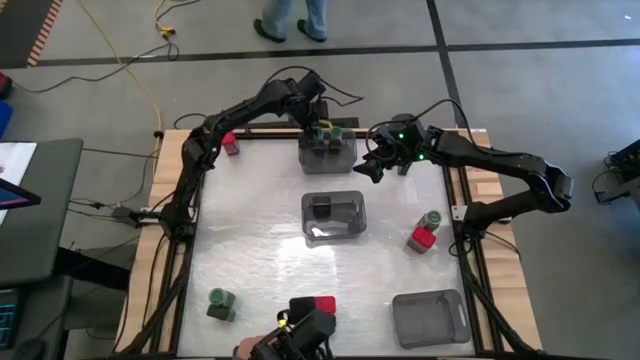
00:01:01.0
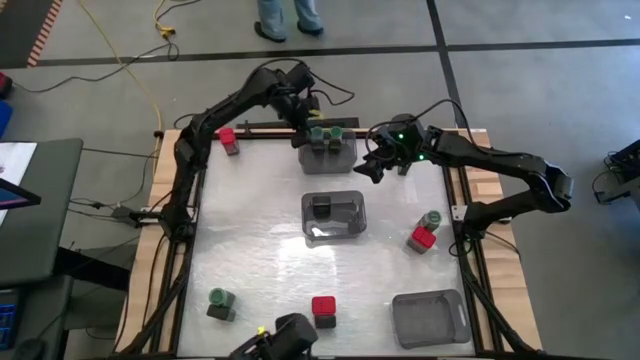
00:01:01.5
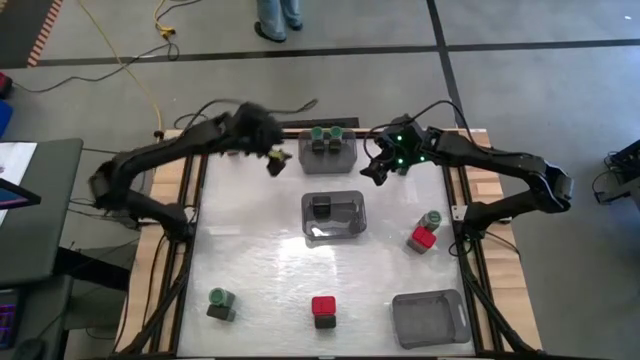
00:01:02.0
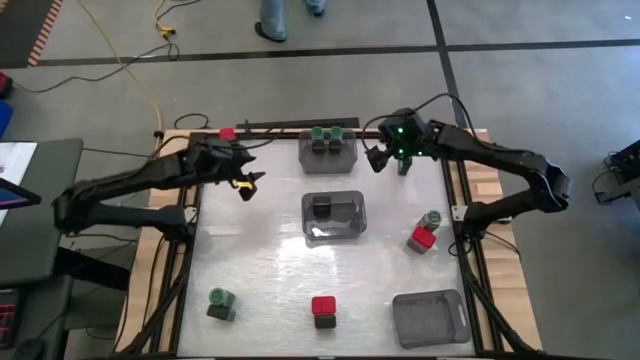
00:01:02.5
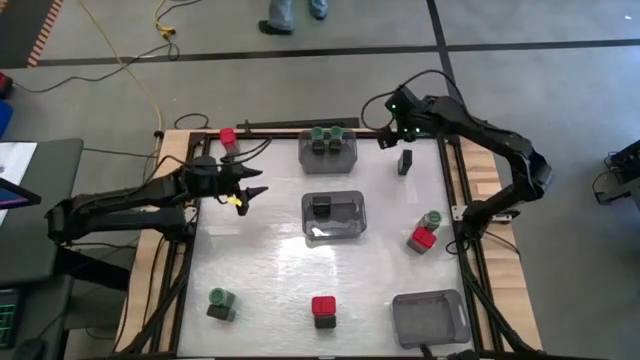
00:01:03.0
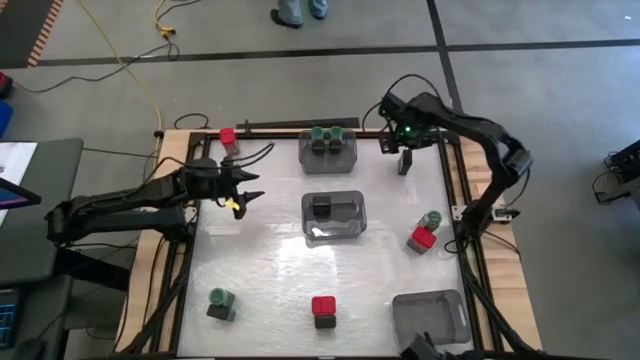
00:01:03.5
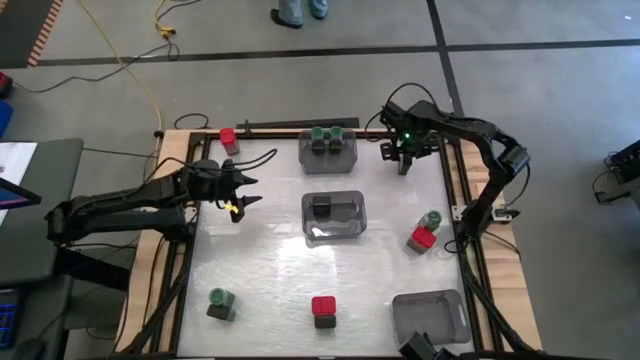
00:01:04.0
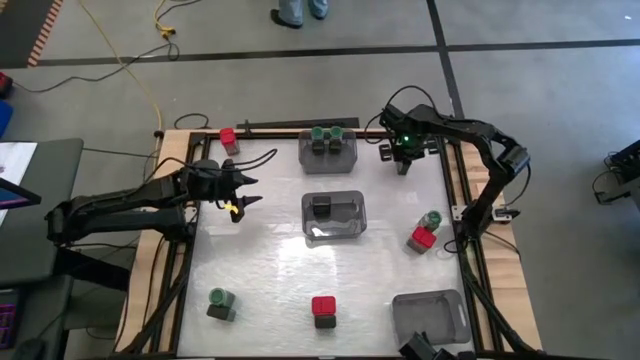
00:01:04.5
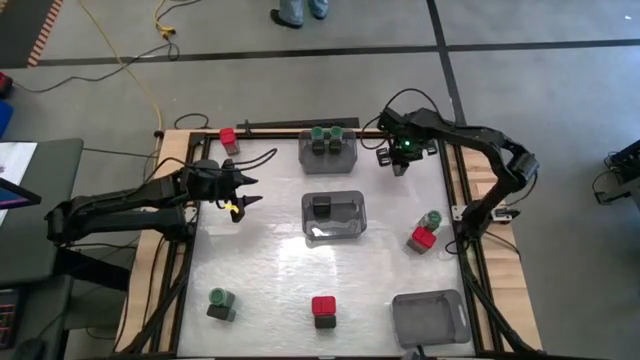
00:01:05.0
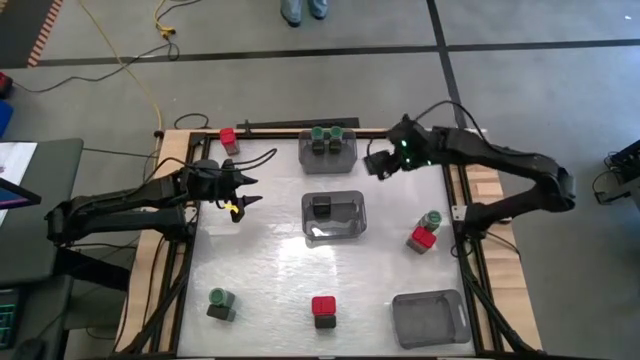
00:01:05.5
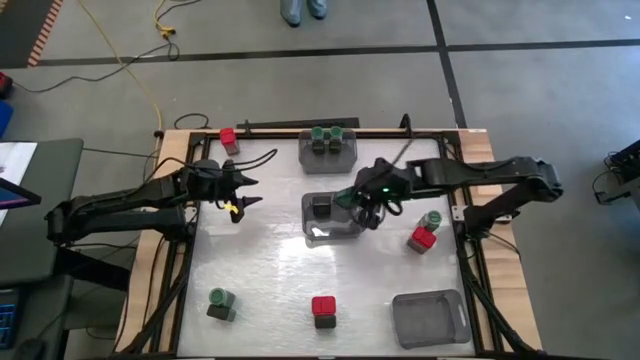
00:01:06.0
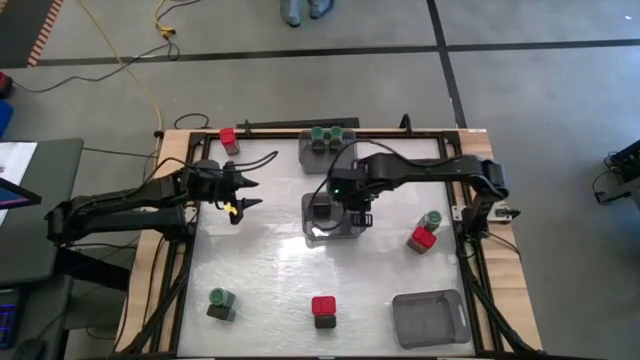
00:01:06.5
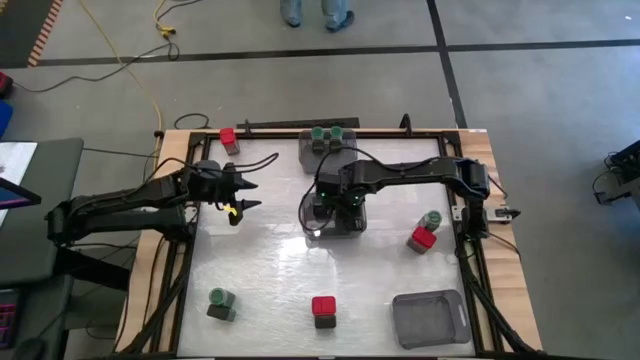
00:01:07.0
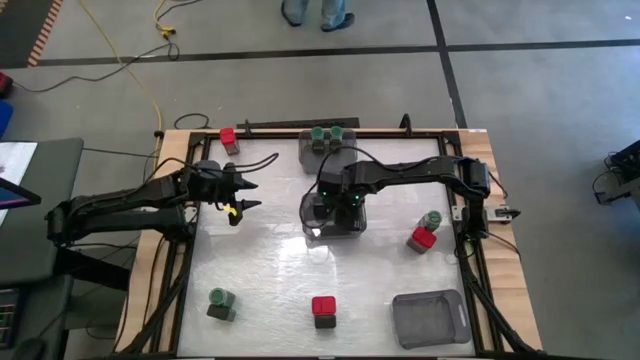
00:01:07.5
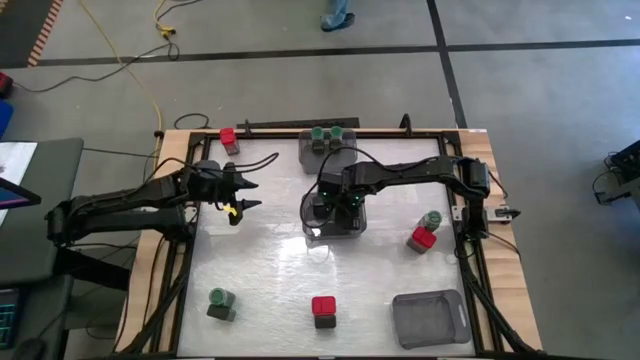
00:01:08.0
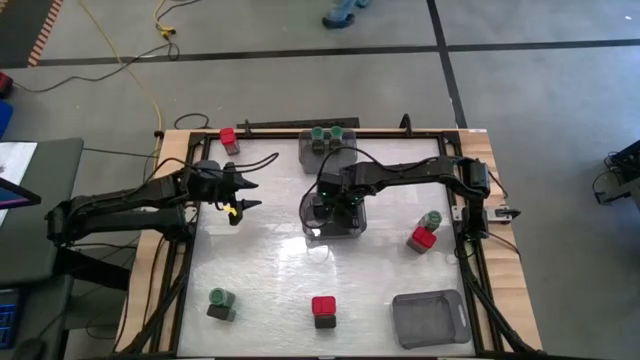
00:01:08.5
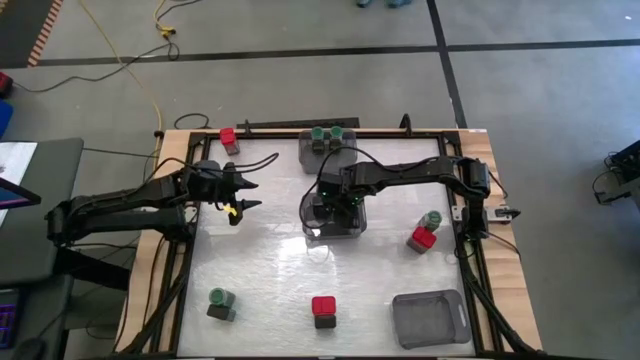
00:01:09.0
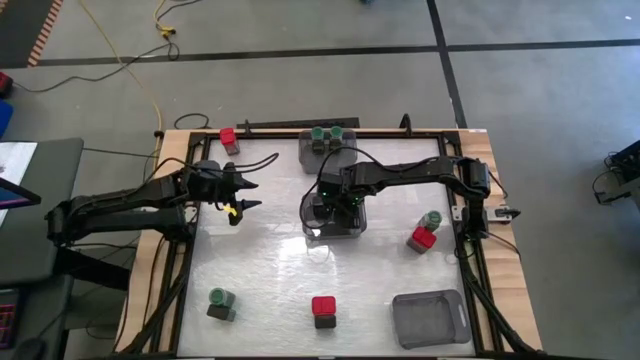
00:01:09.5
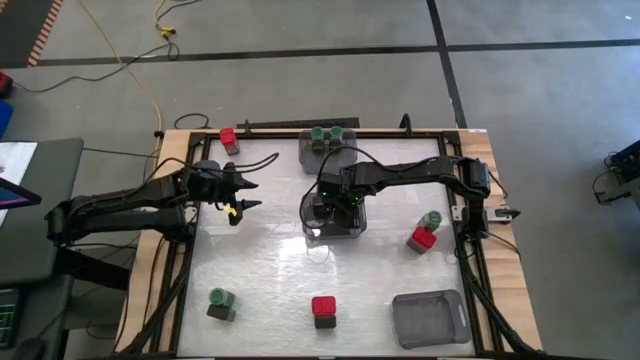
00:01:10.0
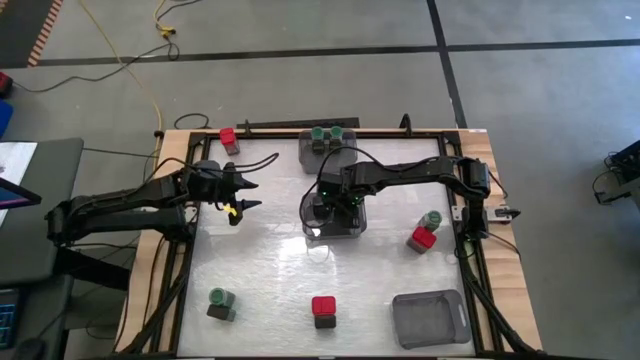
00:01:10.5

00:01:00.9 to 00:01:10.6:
Task: Sort spices by type
Put the black seasoning can into the middle left black bin

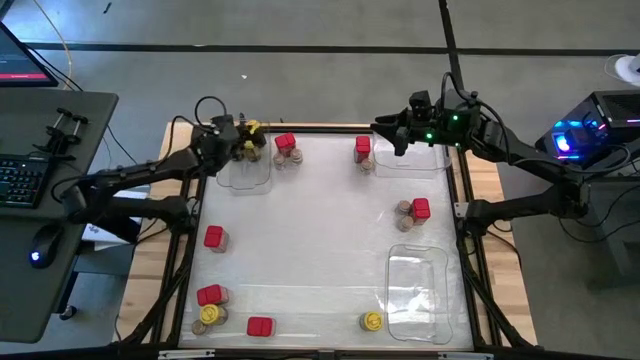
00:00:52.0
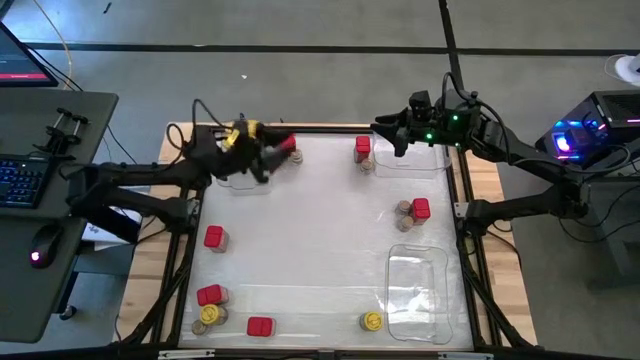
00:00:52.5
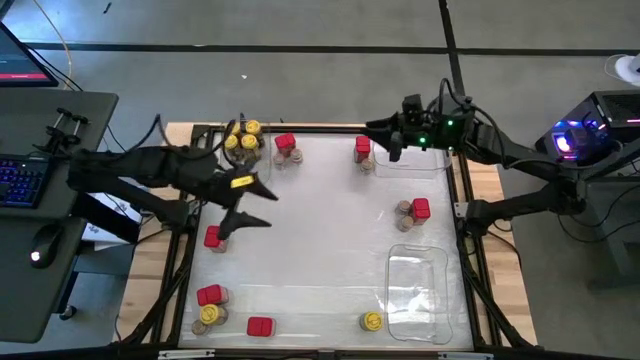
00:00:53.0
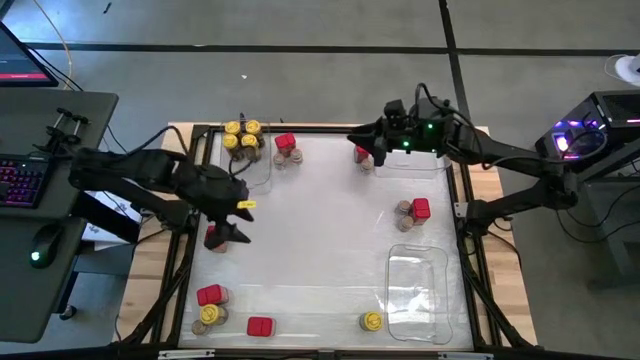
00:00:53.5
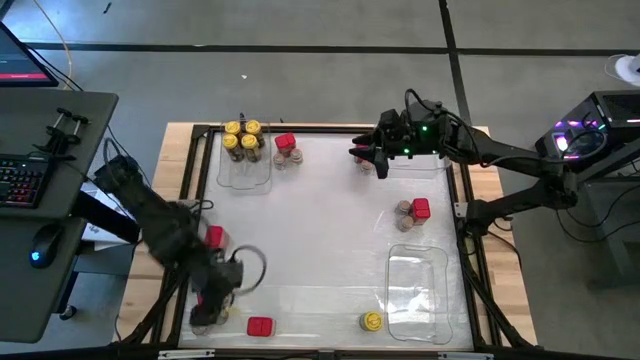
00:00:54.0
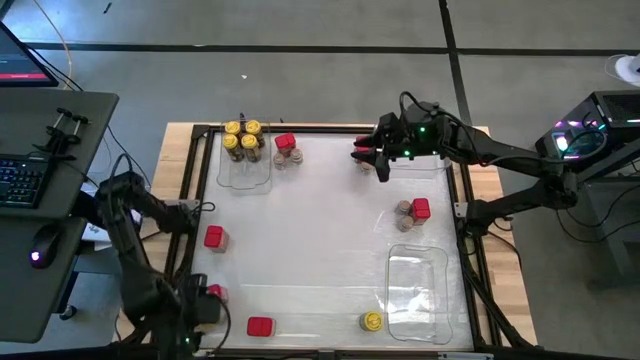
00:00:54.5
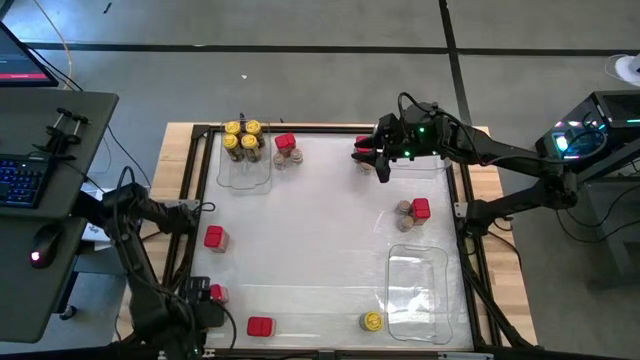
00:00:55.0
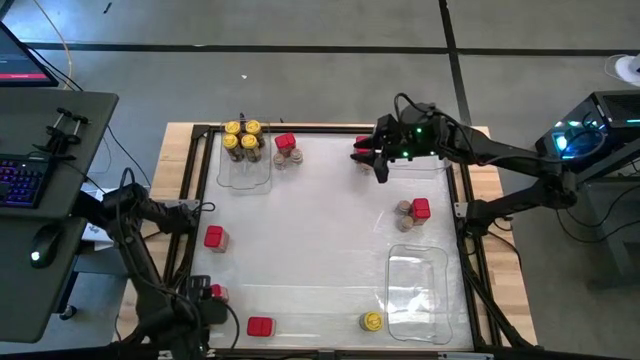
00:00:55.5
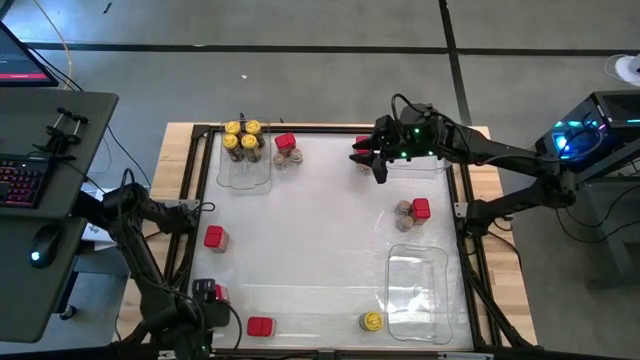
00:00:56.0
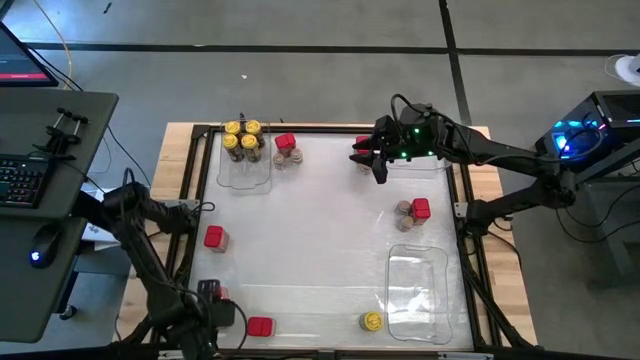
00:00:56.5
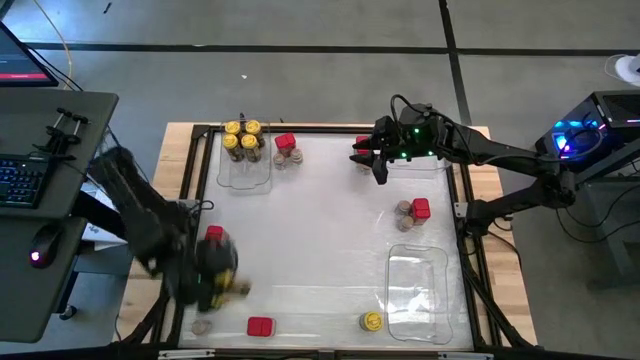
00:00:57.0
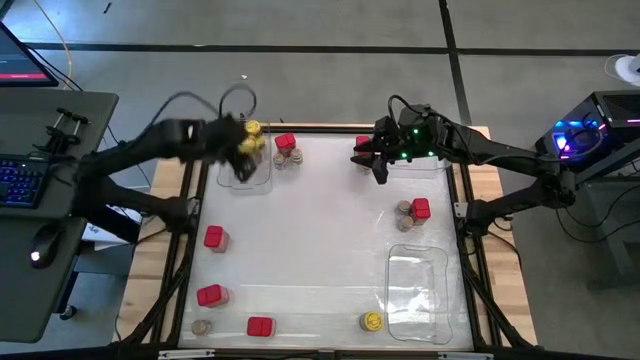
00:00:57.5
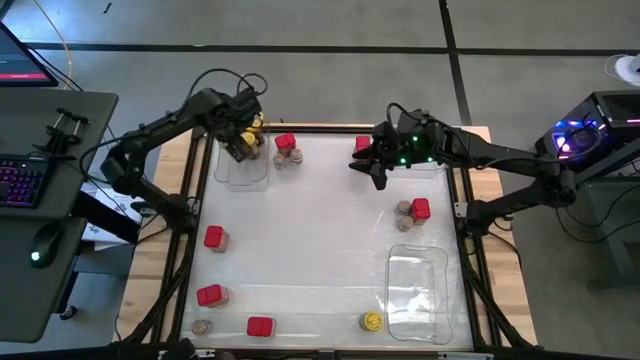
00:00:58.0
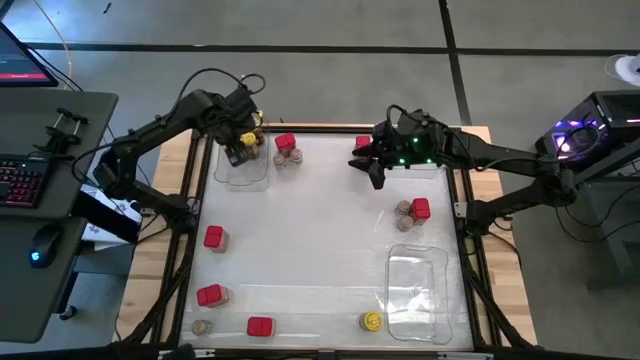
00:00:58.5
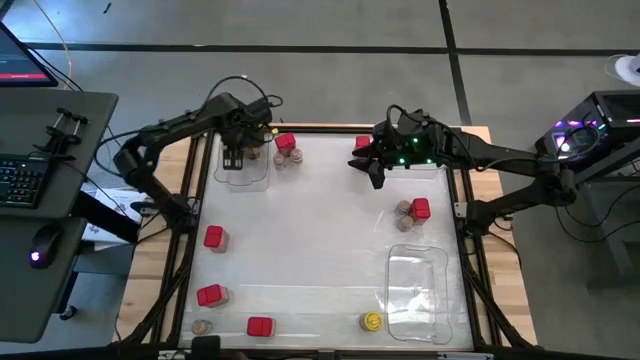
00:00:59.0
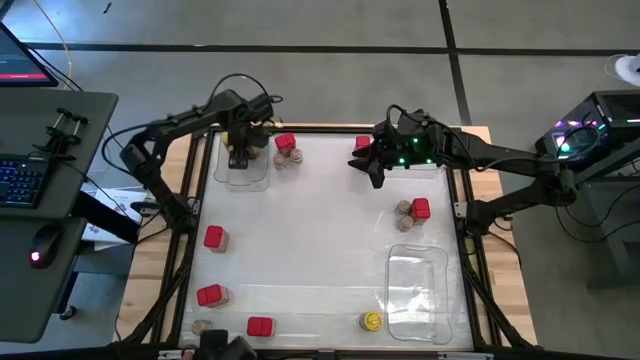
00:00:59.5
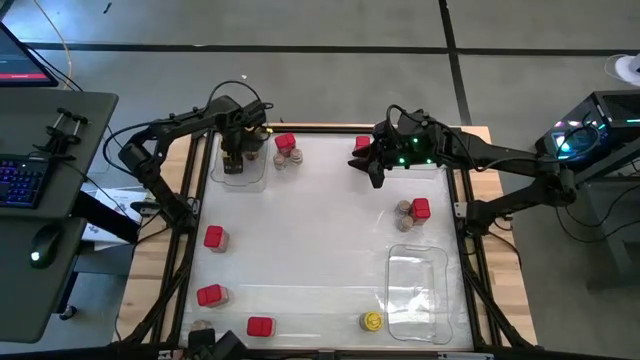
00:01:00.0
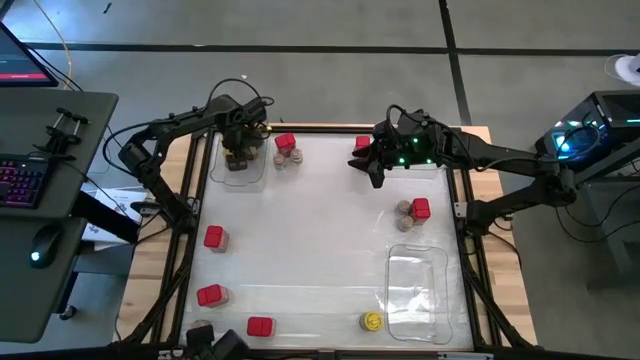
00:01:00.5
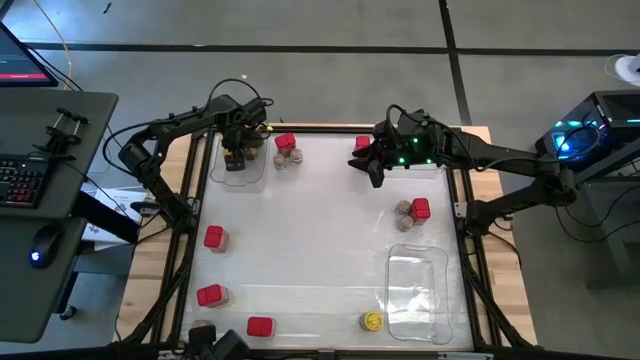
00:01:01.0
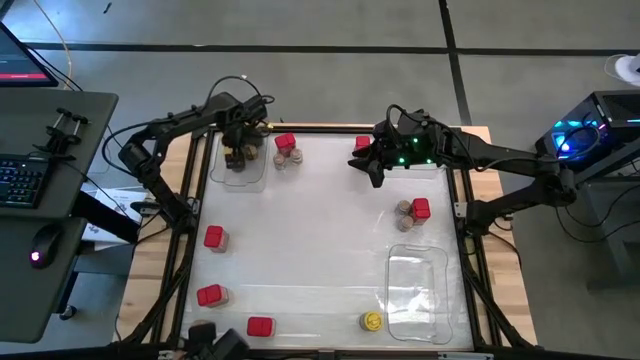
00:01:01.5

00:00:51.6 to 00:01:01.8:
Task: Sort spices by type
Put the yellow seasoning bottle into the top left transparent bin
